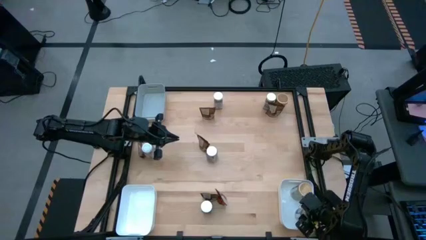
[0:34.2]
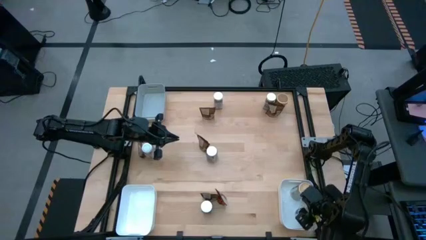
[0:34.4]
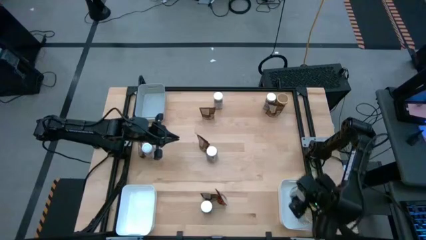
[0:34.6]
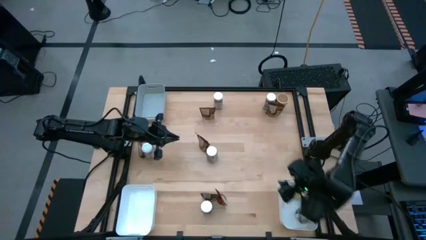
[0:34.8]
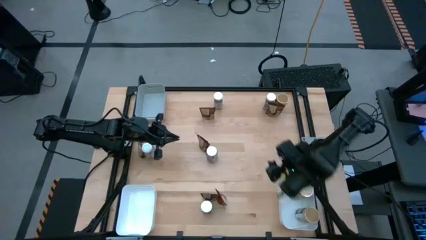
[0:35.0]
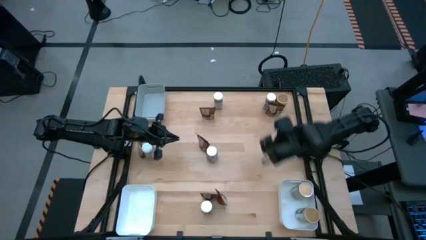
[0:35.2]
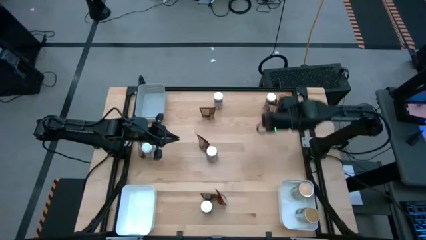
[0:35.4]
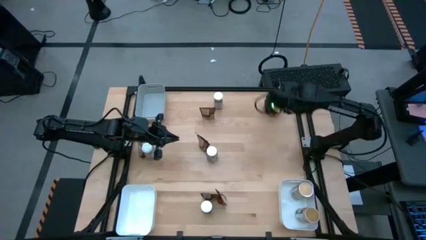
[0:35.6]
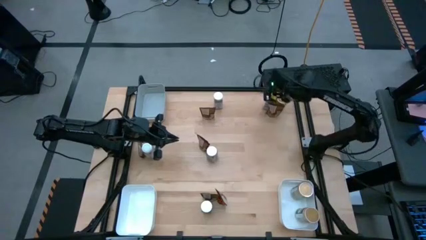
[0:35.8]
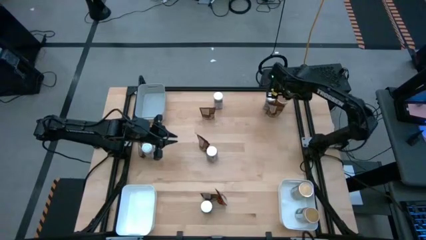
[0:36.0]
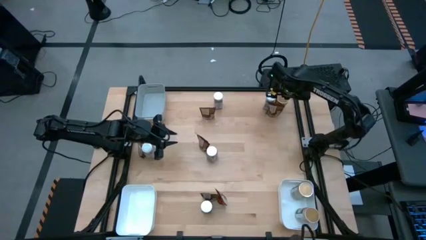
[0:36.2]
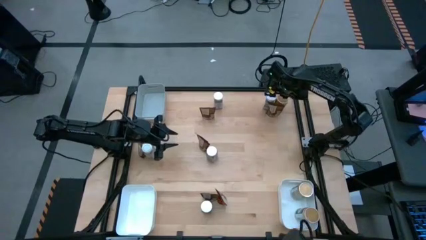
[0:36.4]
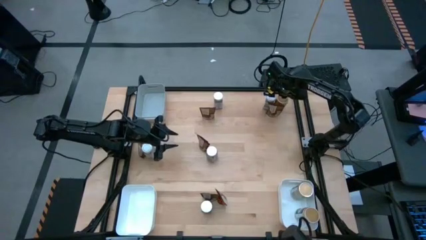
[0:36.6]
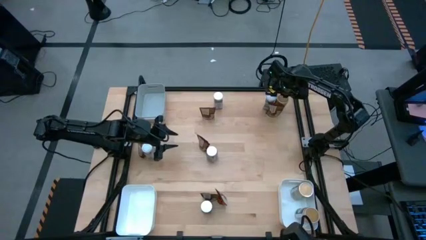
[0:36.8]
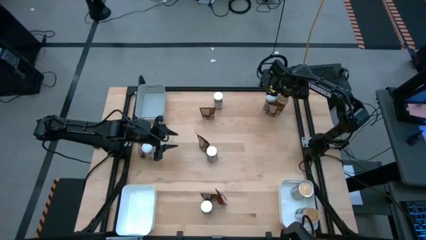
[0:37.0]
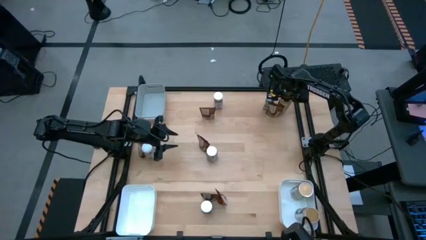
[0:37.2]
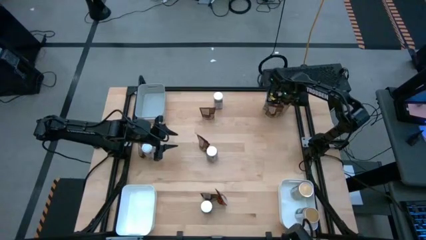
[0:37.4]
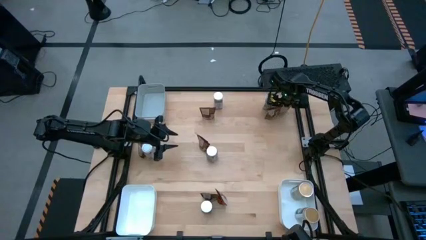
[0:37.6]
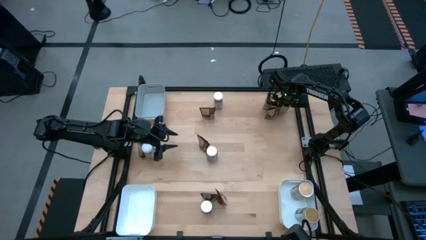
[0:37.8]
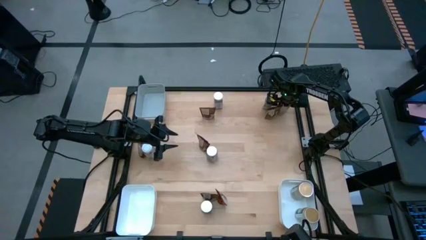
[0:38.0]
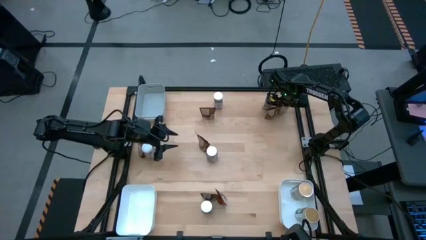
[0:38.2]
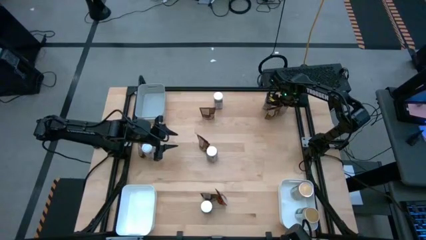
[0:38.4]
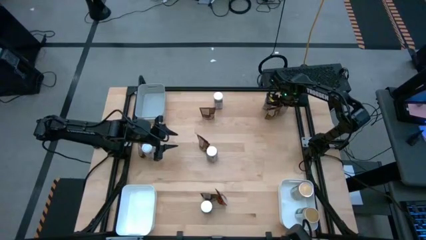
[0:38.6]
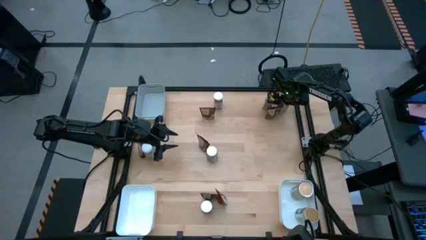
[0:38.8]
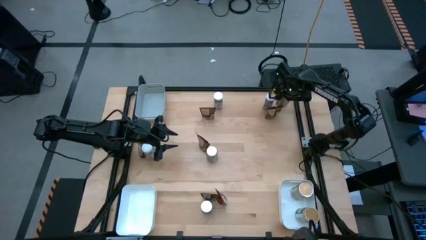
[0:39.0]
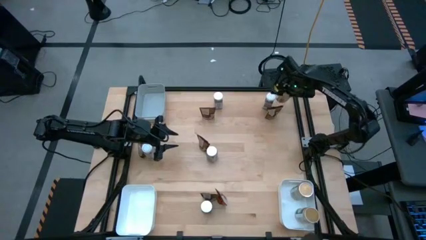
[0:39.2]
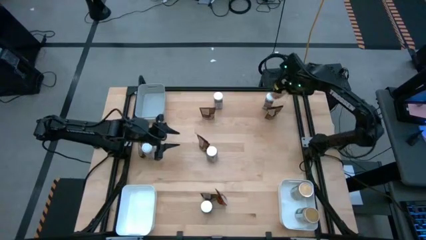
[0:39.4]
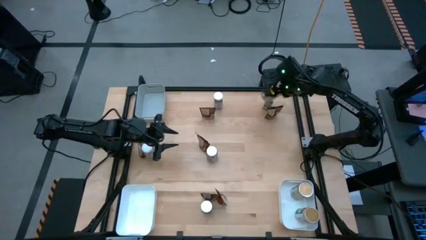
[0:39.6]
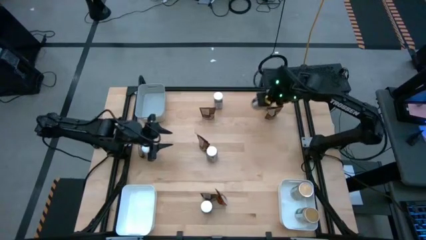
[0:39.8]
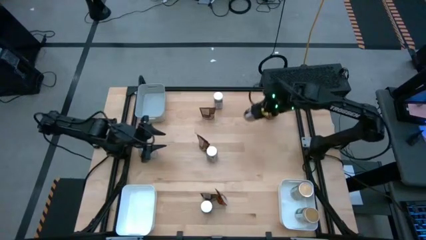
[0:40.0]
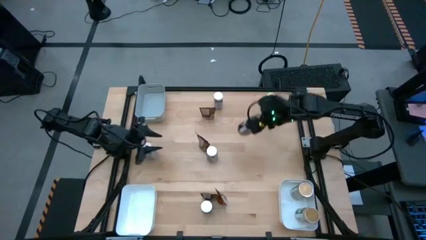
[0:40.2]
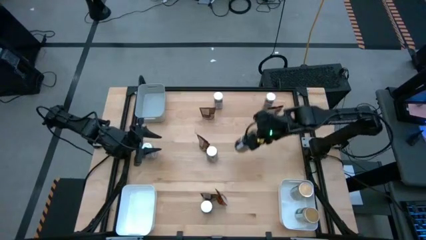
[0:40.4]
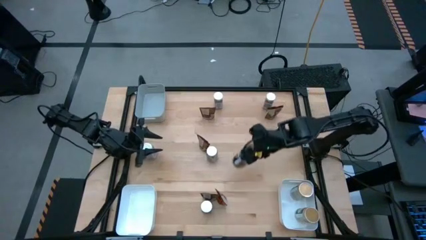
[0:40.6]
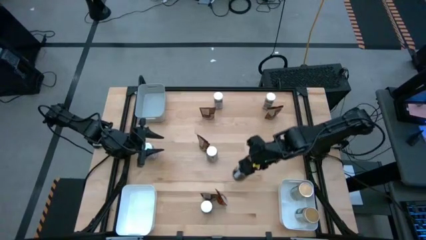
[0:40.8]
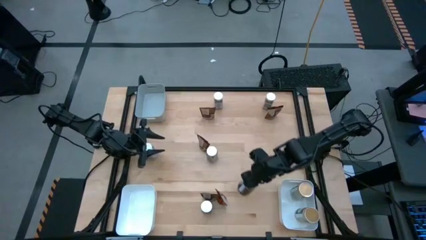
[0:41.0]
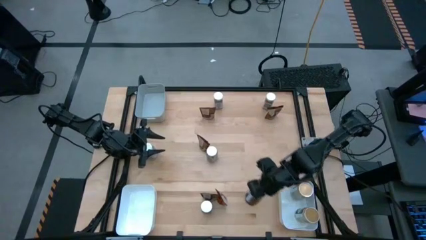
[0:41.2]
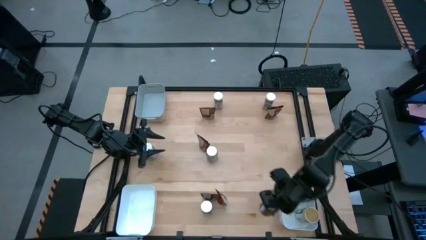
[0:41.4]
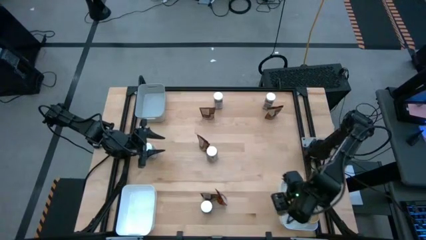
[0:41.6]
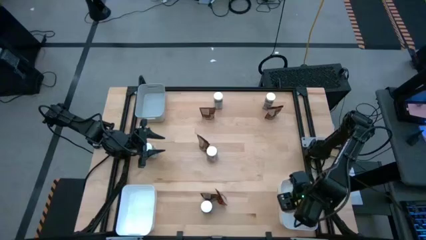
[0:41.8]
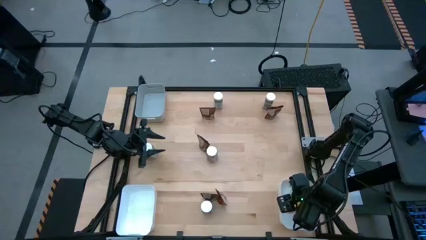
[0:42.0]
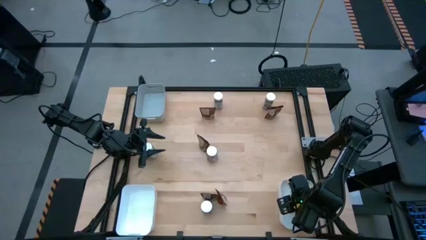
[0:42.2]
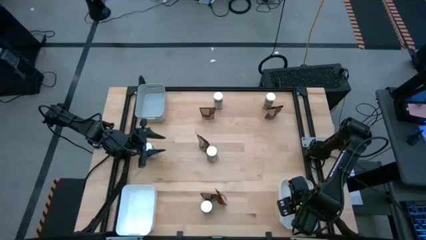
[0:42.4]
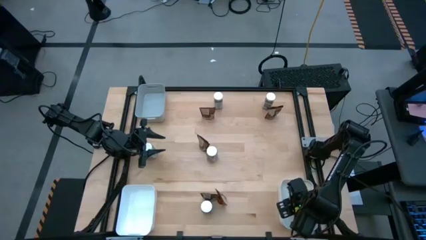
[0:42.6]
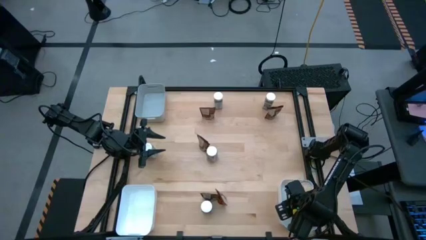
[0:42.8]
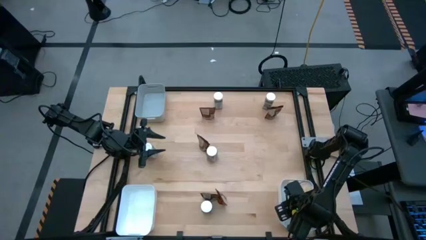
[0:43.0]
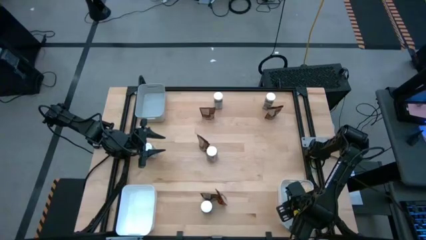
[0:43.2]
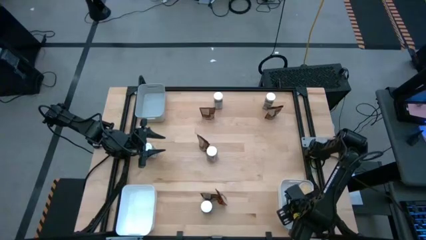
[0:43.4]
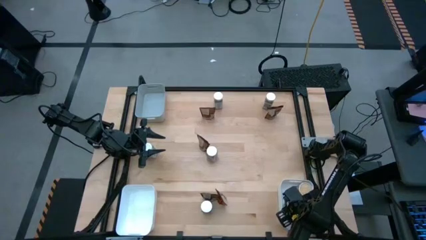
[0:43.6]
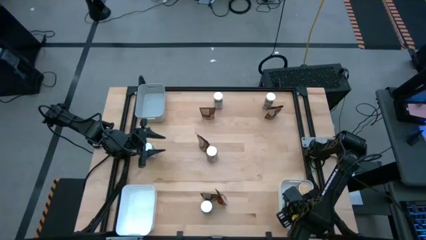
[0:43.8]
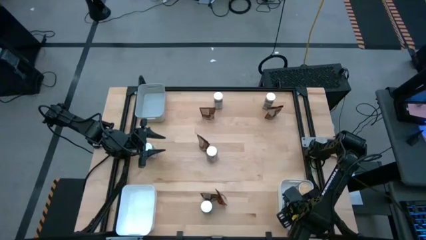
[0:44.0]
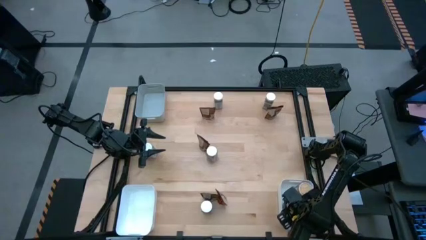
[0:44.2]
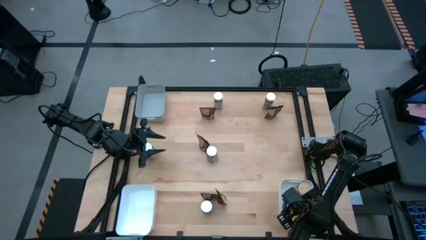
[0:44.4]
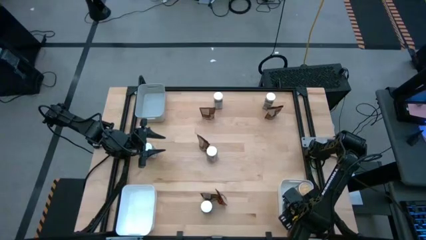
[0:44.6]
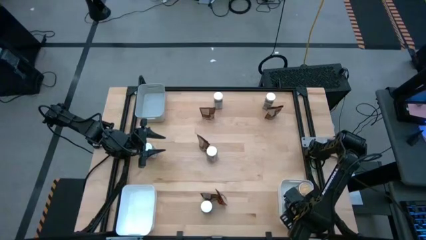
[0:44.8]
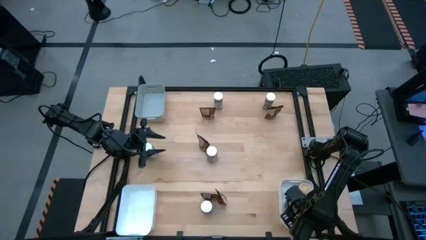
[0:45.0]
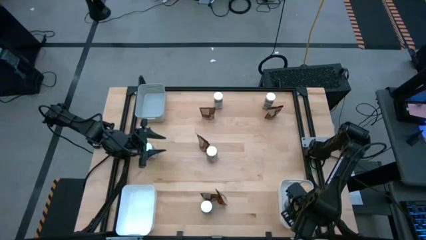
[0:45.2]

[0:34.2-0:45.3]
Task: Sort spices by type
Put the brown seasoning bottle into the bottom right white bin
